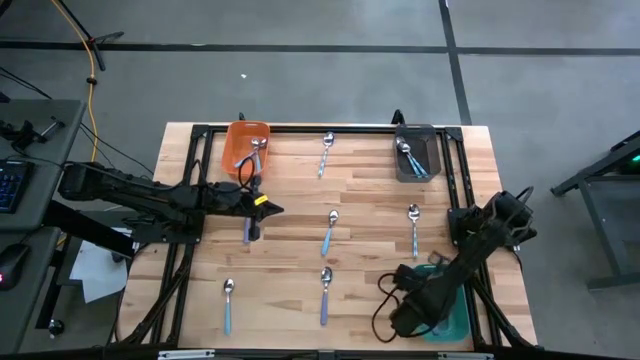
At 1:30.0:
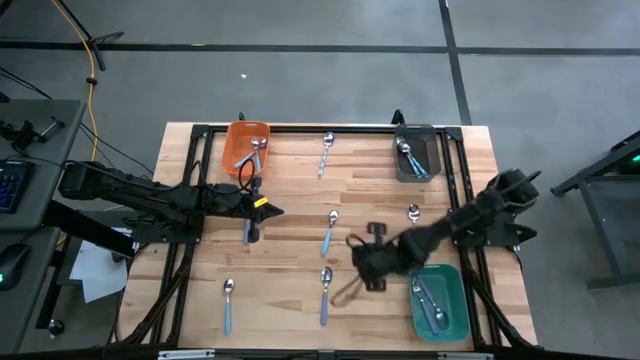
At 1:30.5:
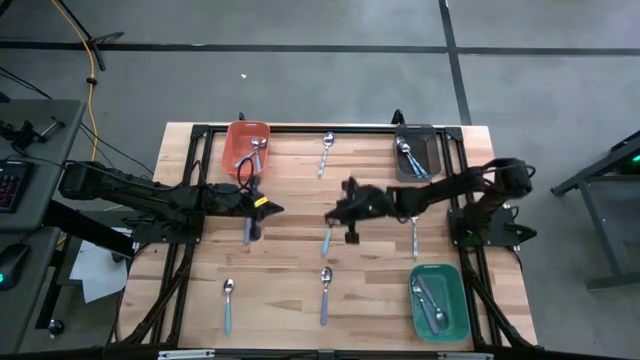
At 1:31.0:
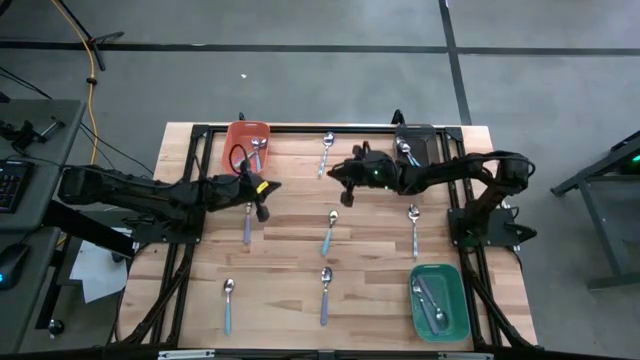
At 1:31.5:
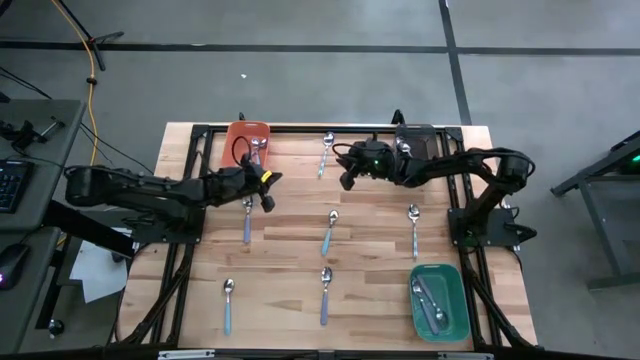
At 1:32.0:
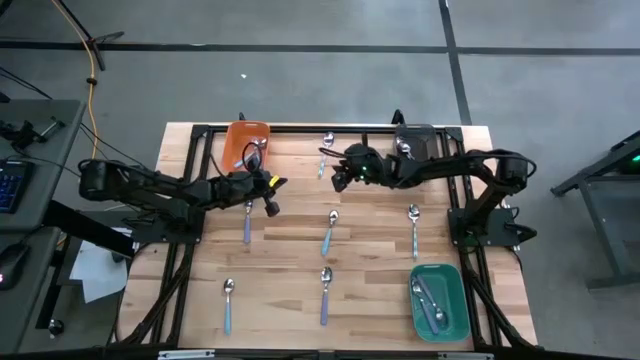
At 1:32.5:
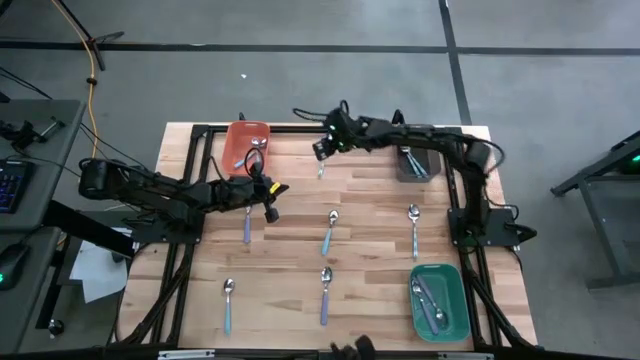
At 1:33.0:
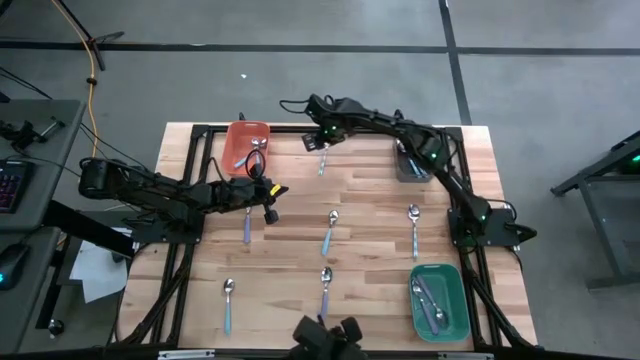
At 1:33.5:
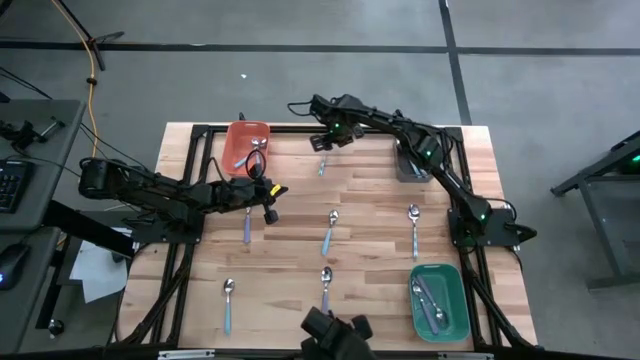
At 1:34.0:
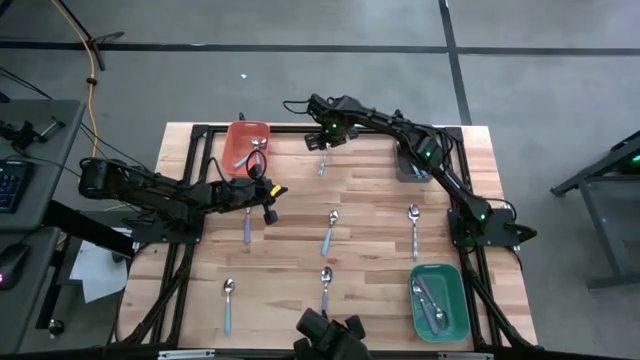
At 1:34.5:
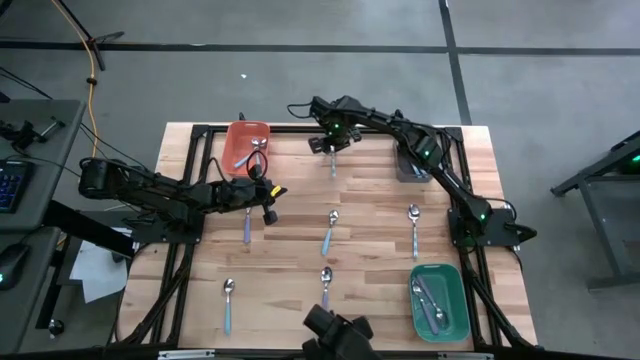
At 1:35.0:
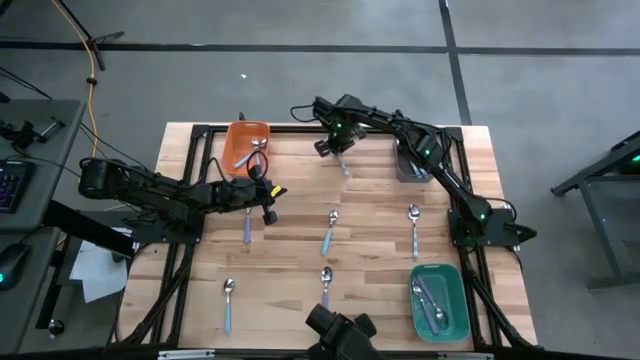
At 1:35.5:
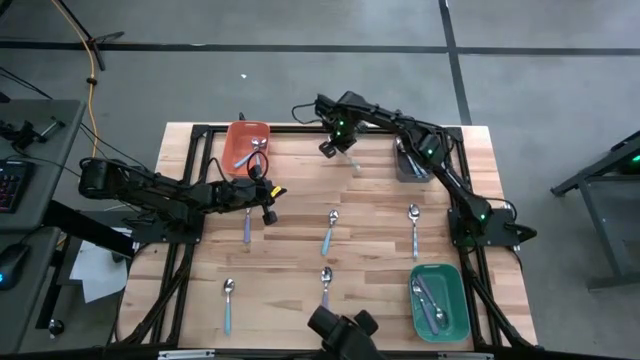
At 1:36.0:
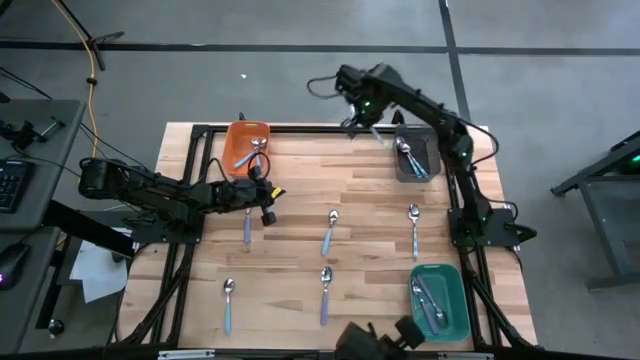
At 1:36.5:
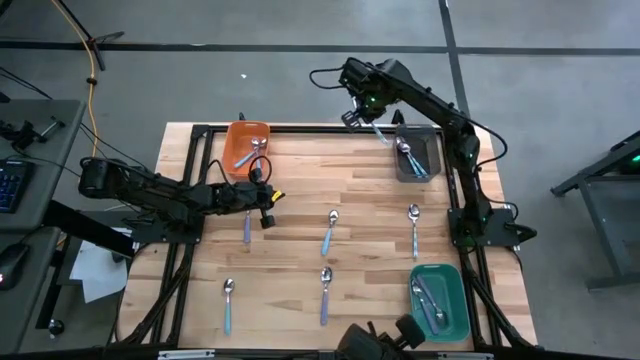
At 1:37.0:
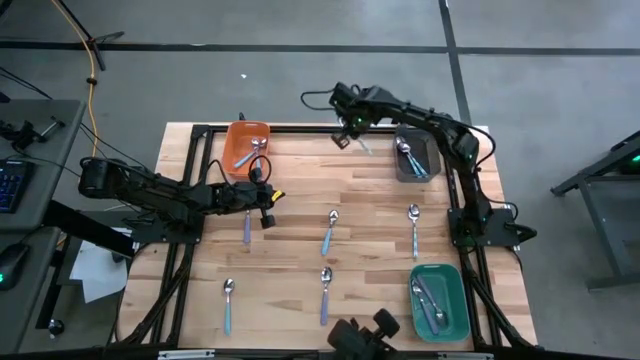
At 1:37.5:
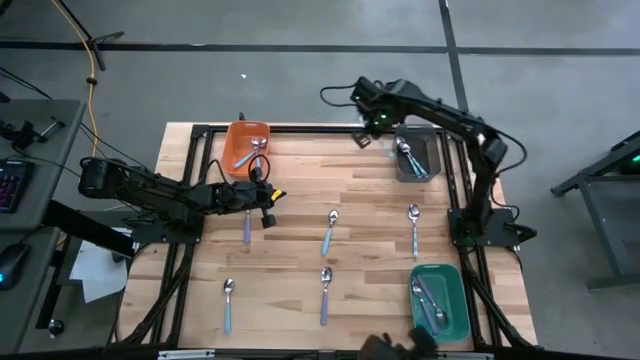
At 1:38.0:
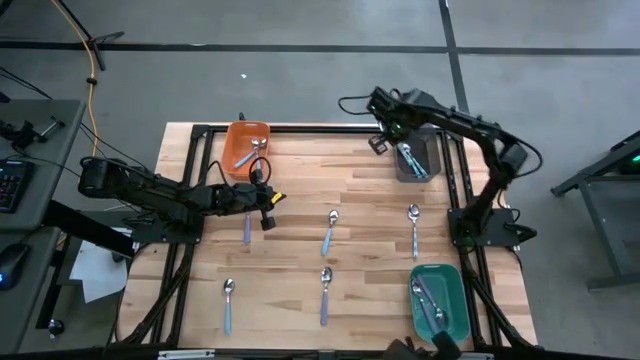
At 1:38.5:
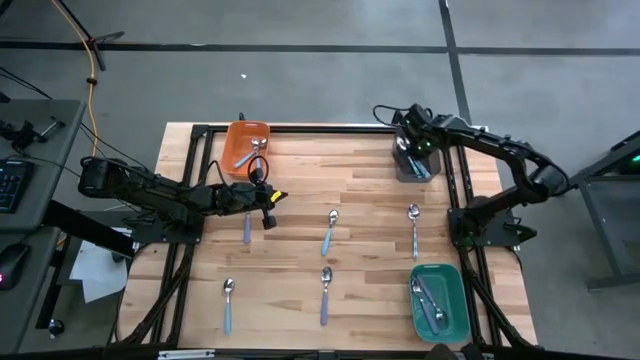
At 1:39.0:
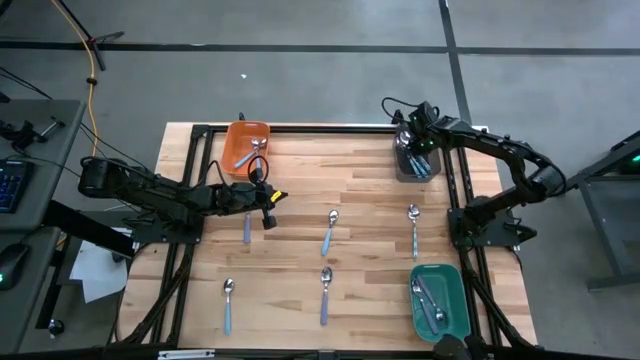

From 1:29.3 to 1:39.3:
Task: Sort silverware by color (type)
Put the white patterned spoon into the black bin

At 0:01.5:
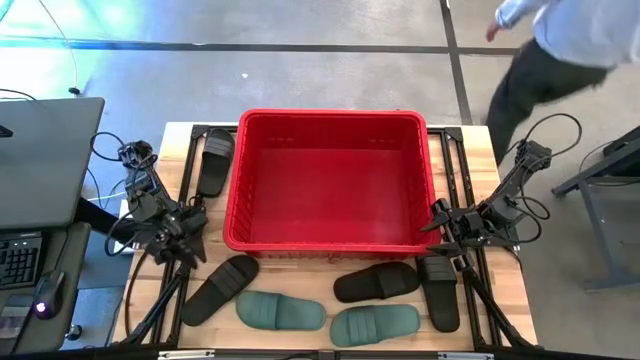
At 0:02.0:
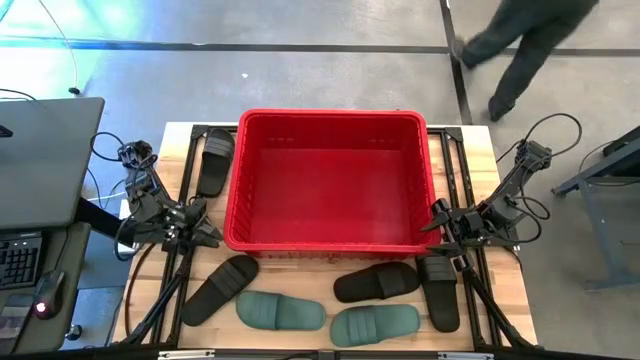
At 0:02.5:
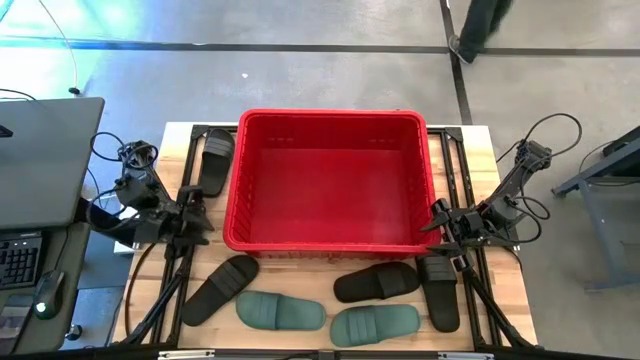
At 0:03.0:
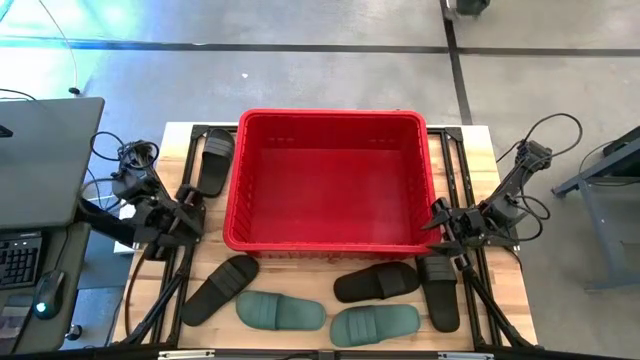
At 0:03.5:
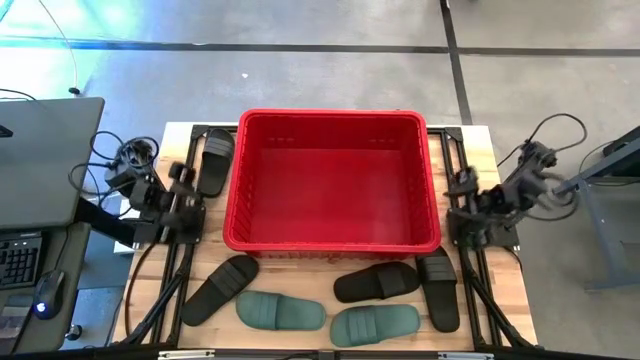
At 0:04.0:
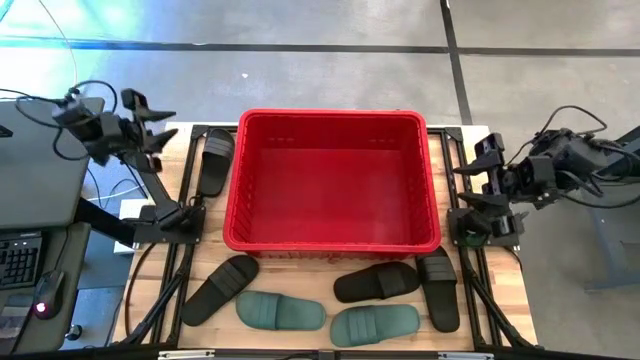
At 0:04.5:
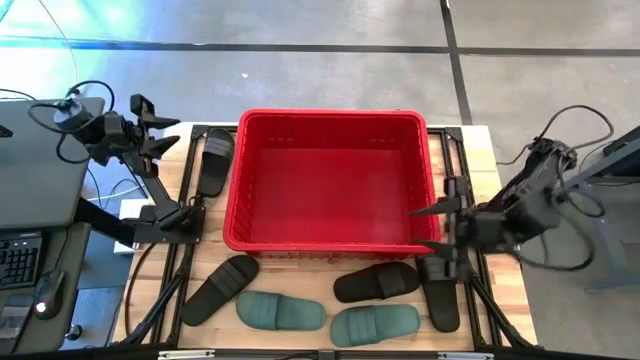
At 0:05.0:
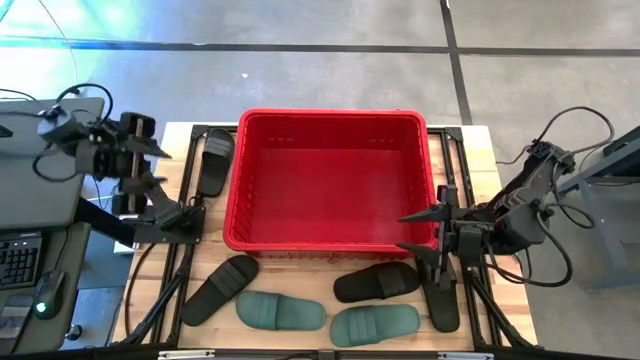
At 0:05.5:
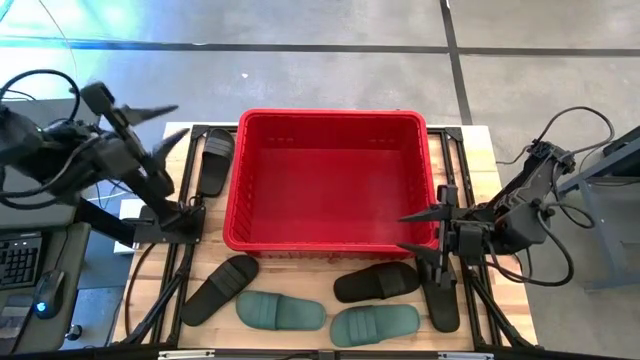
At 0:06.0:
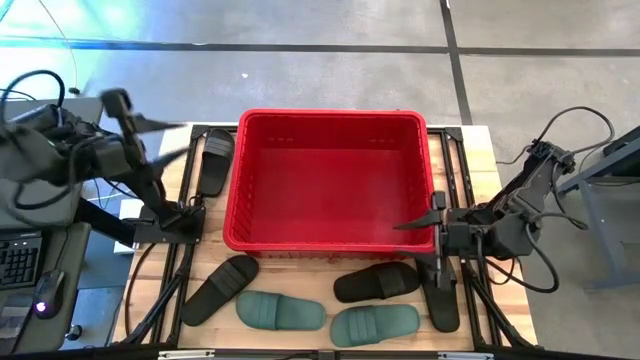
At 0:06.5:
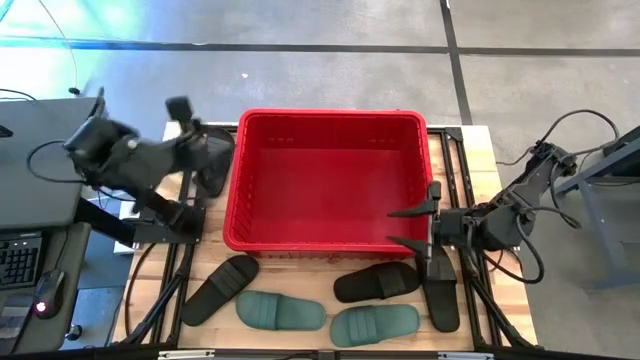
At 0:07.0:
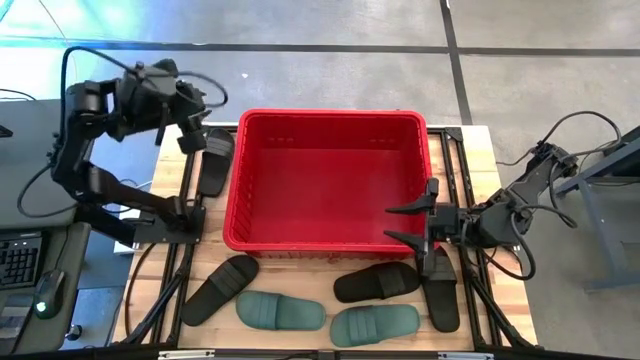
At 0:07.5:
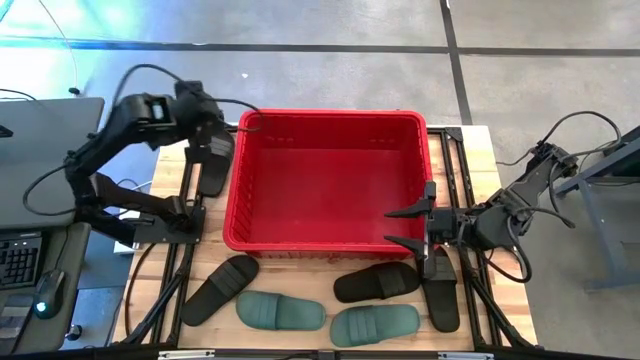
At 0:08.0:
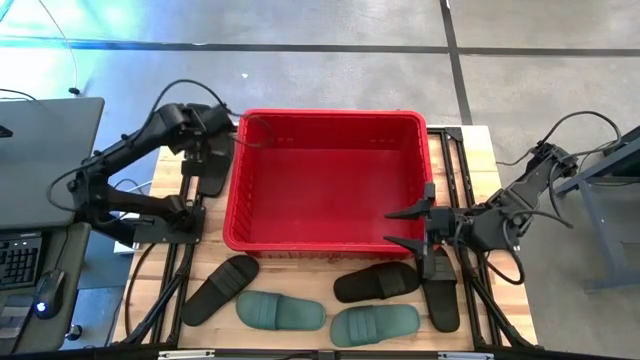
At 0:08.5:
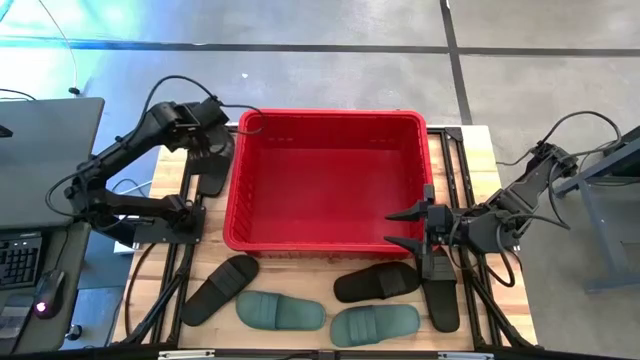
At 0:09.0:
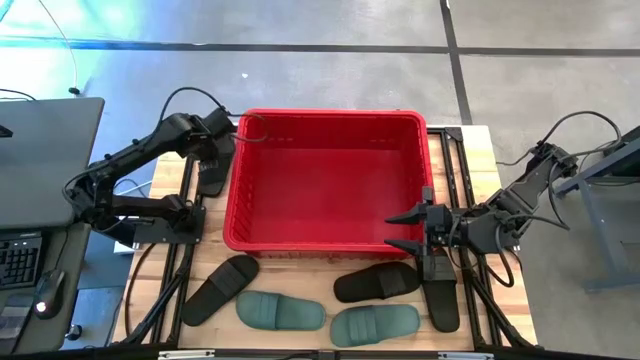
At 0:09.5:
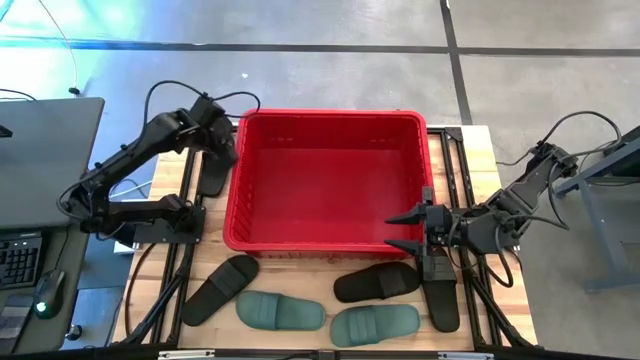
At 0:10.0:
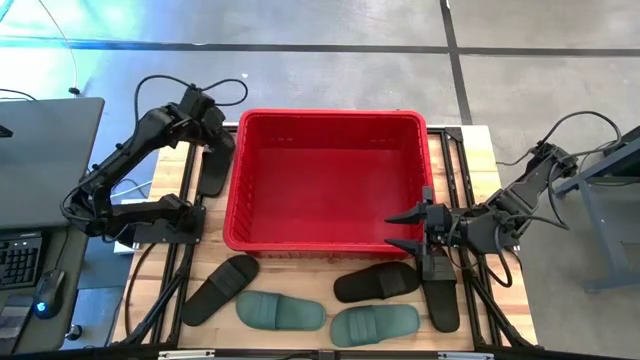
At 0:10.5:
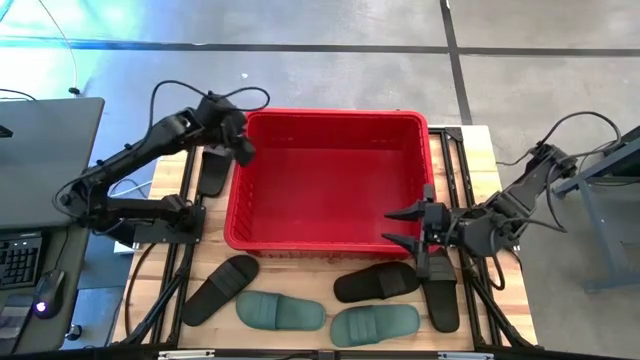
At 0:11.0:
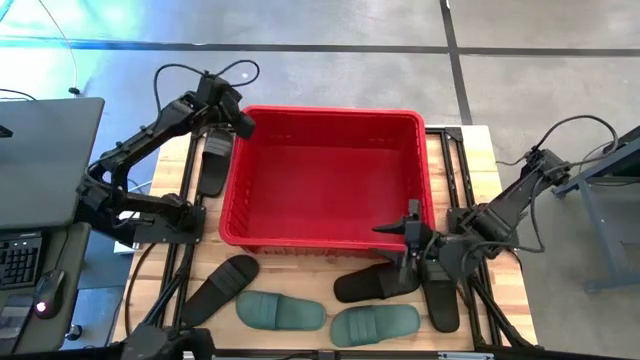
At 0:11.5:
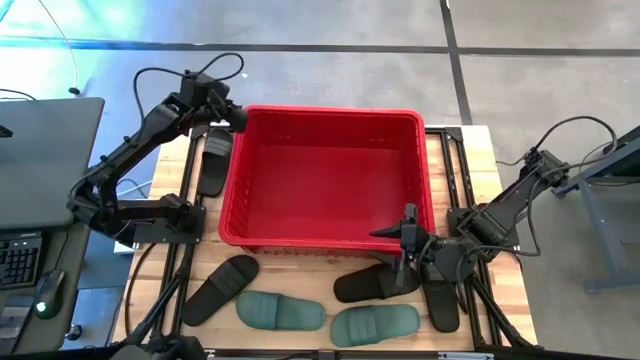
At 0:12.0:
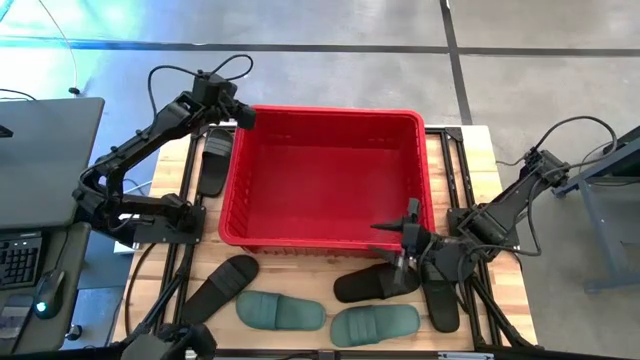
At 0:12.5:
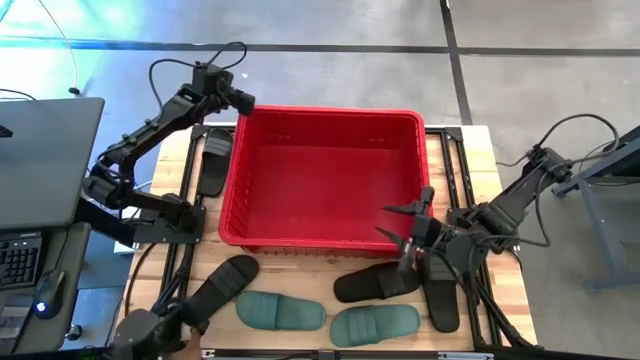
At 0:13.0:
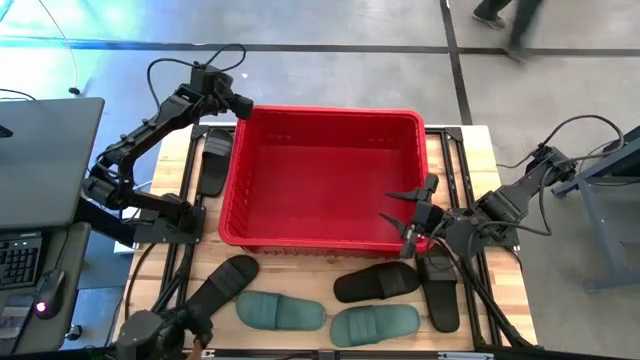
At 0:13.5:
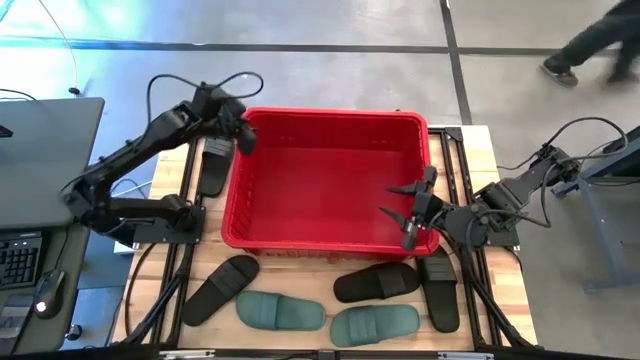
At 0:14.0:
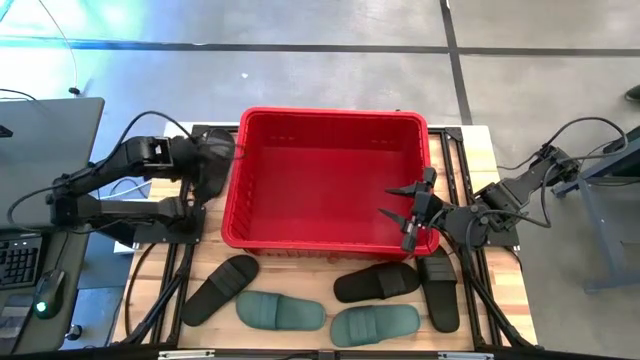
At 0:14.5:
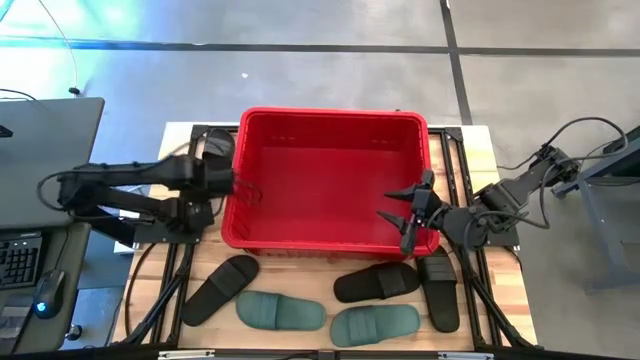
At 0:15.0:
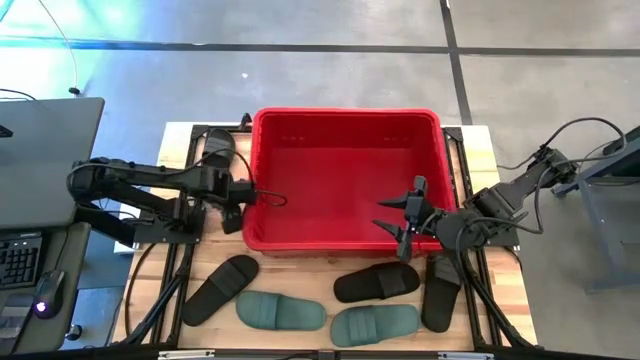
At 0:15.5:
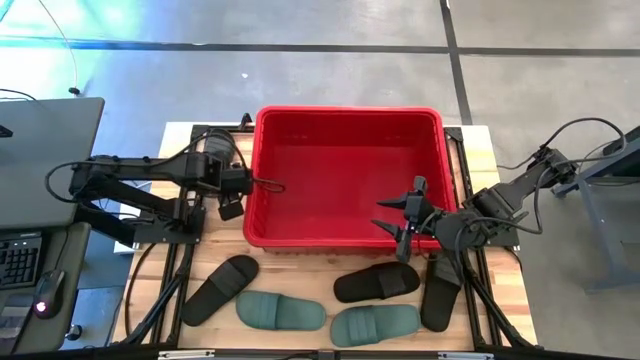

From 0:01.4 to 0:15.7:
Task: Pick and place slides into bin
Adjust the red bin on the table
